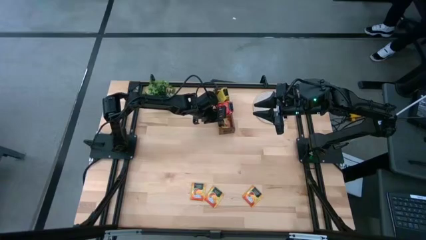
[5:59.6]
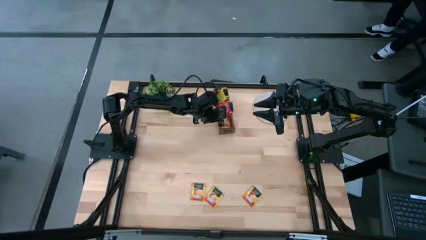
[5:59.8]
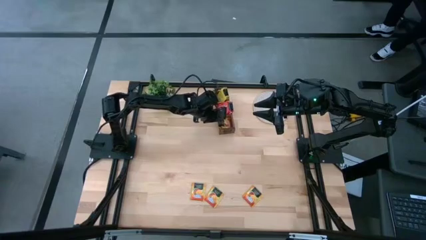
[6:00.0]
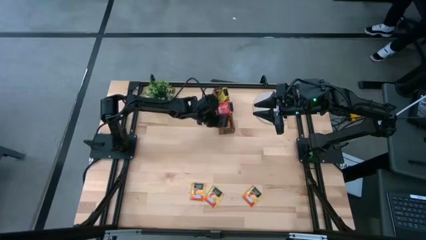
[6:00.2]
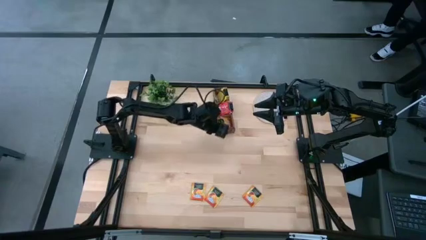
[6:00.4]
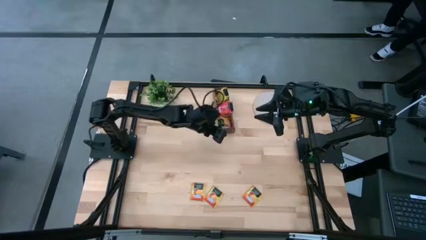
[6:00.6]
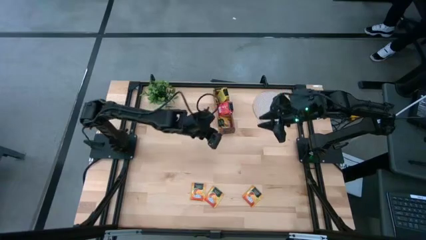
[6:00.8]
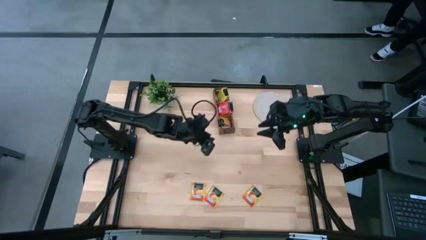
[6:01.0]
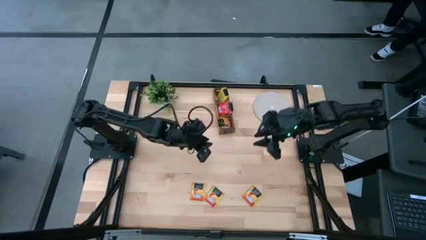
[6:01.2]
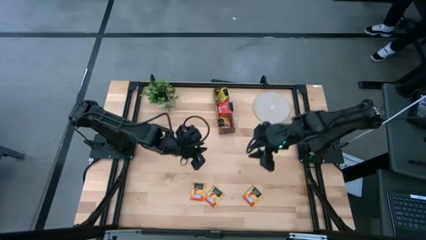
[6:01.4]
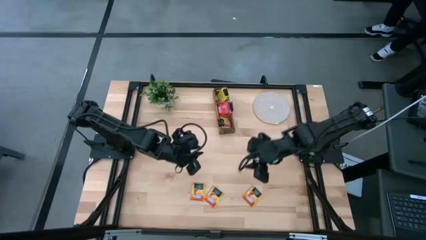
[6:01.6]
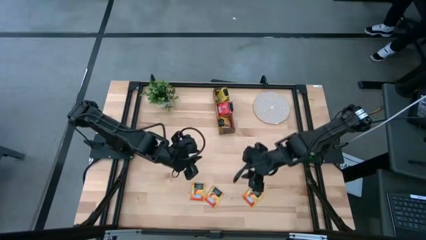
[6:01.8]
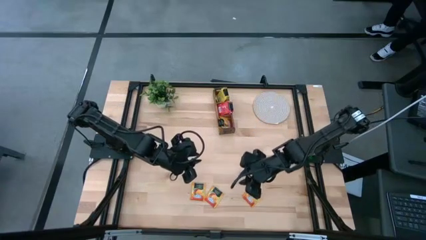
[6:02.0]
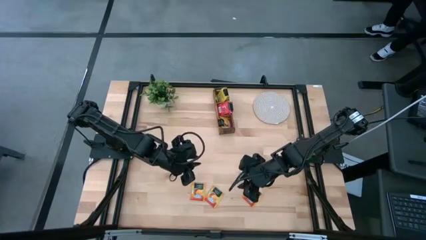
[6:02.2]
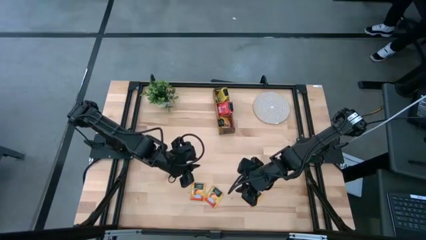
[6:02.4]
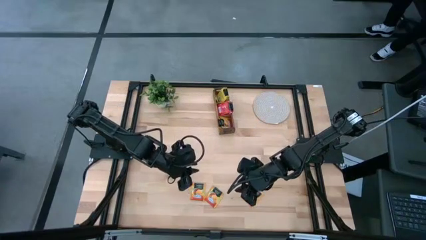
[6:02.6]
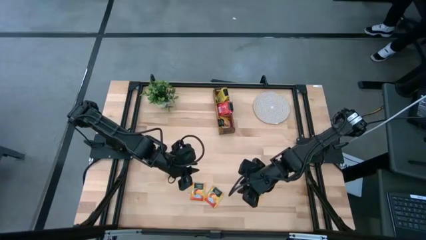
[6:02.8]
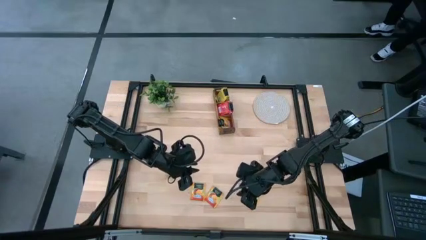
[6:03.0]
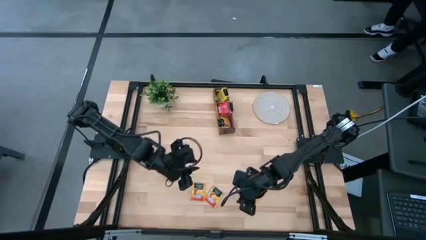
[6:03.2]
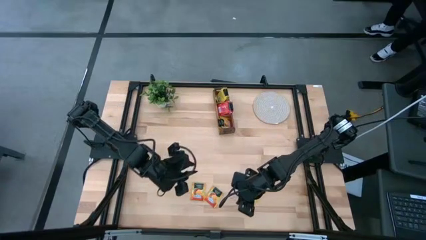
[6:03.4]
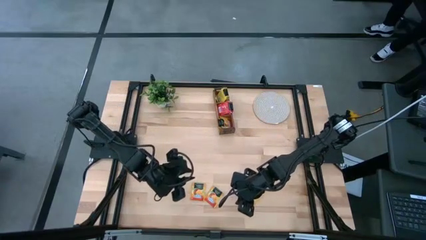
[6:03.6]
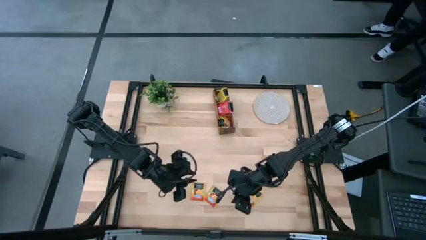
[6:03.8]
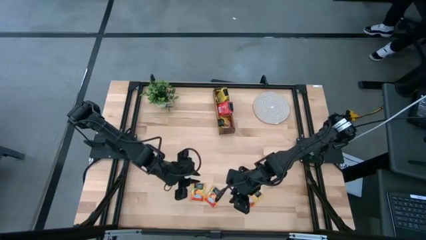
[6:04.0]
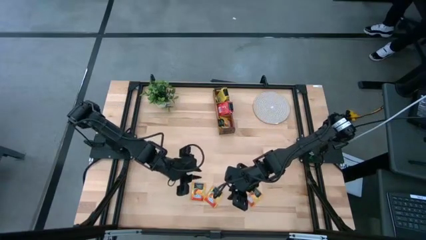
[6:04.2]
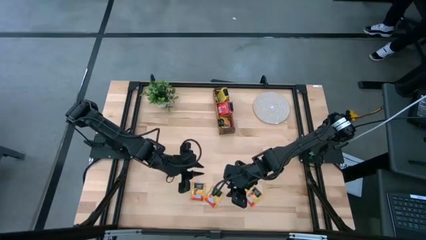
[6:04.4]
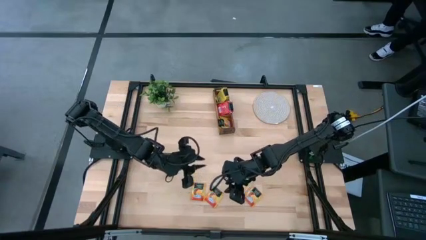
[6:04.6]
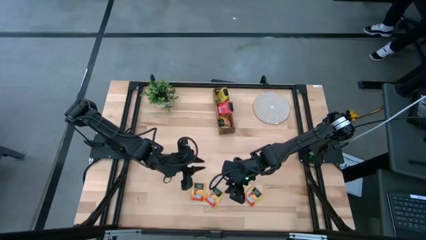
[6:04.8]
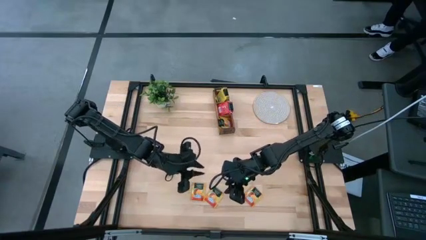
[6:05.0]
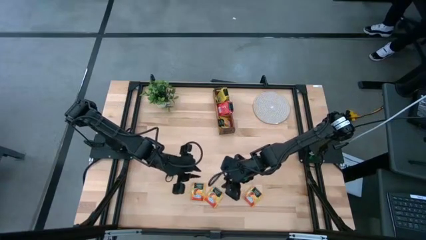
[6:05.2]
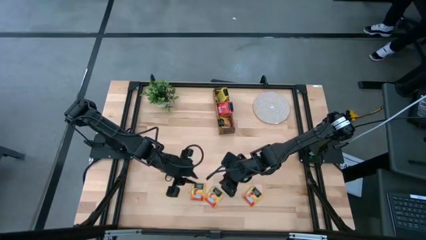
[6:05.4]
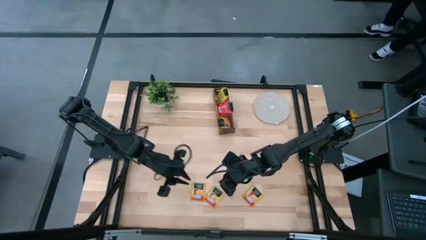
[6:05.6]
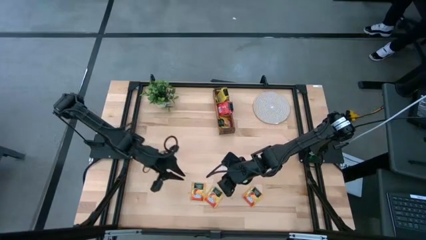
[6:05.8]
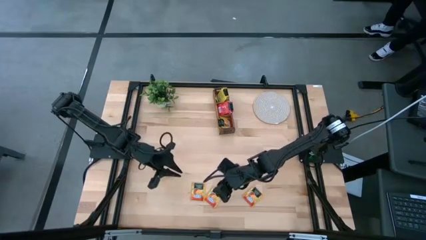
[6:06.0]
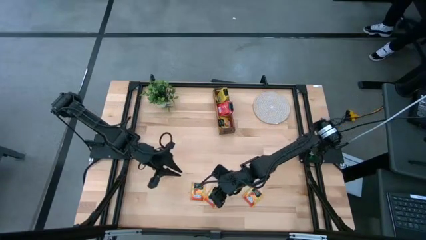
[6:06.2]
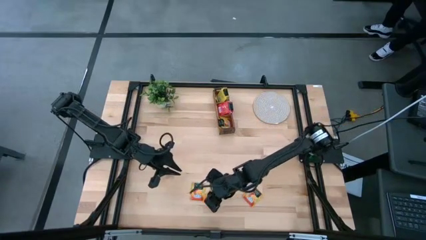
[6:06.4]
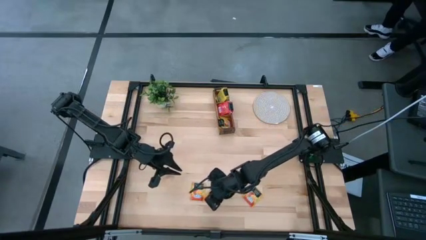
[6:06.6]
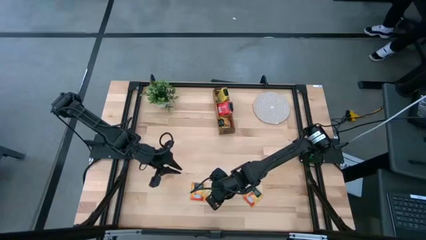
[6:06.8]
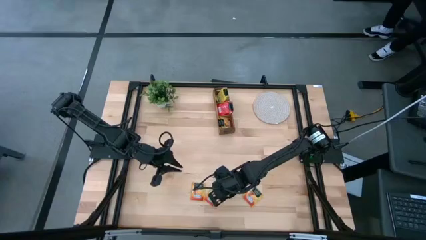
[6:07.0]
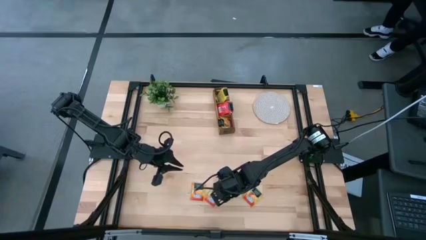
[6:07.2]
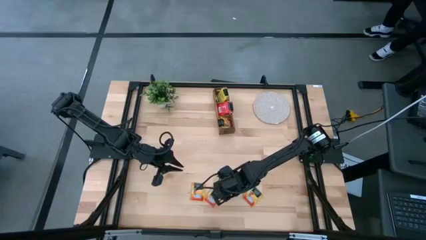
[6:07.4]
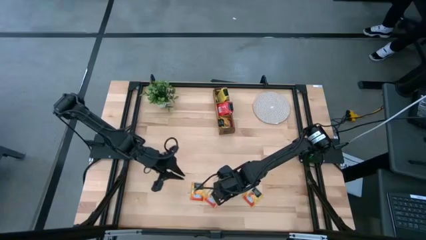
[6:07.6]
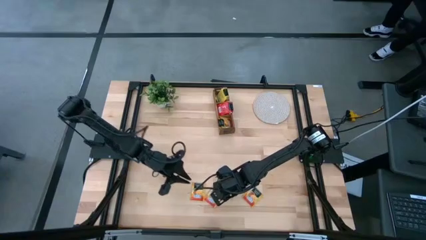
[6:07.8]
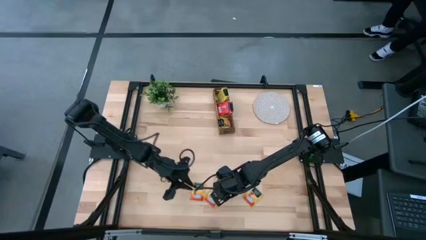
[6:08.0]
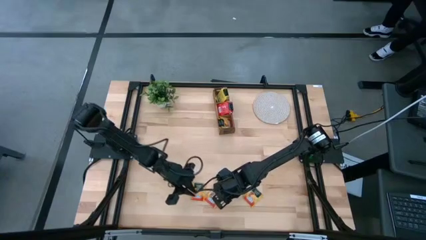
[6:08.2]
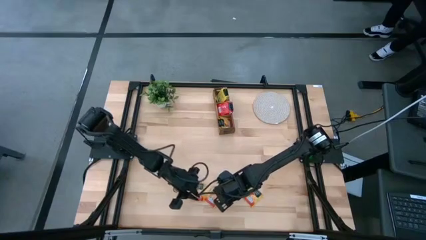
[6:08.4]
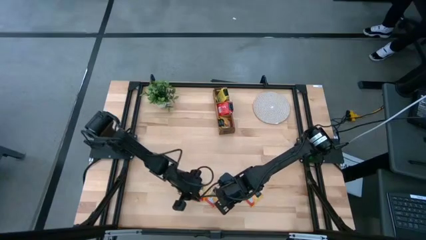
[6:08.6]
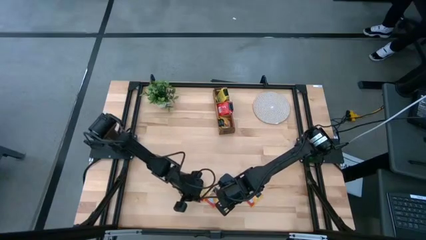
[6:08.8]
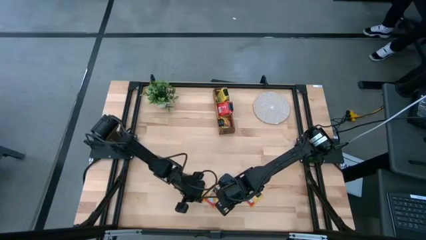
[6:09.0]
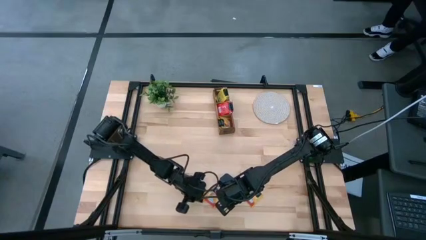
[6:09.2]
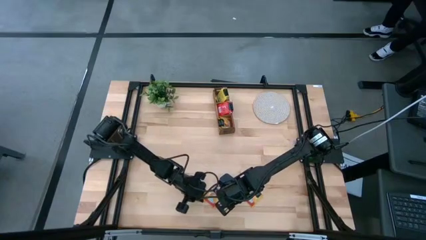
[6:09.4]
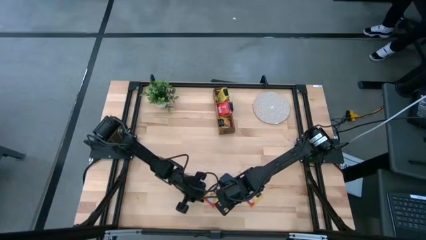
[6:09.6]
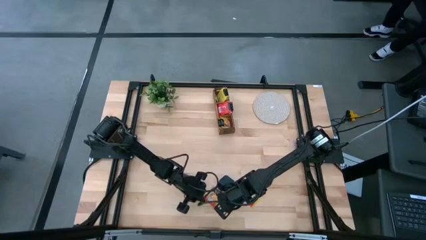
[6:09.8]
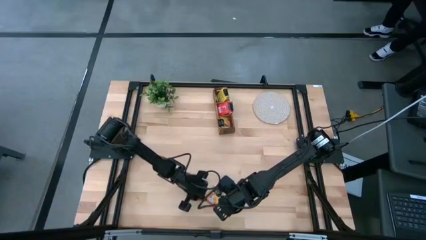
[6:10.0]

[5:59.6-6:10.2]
Task: Pick & Place Tea
Put the orange tea bag into the left section of the wooden organizer

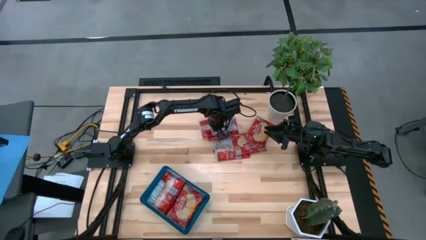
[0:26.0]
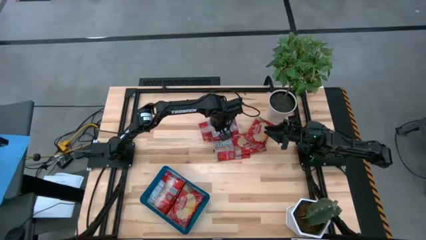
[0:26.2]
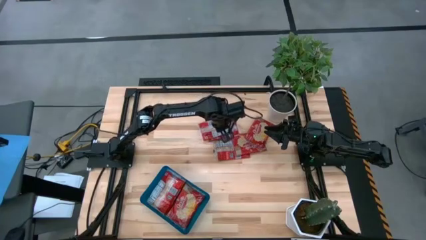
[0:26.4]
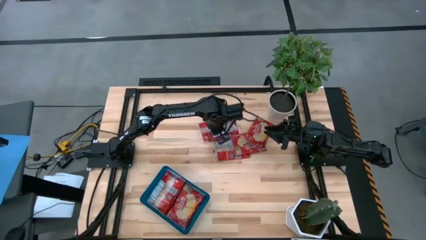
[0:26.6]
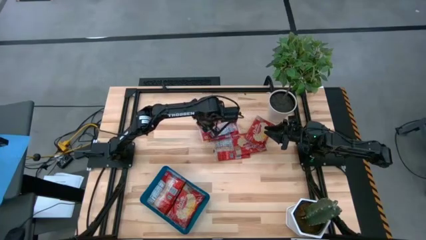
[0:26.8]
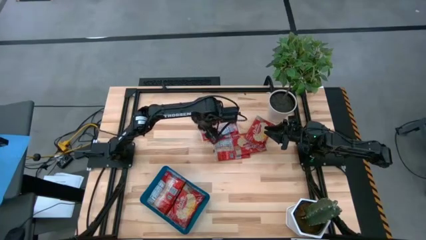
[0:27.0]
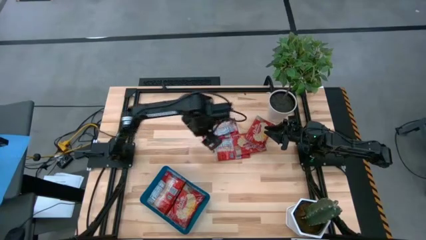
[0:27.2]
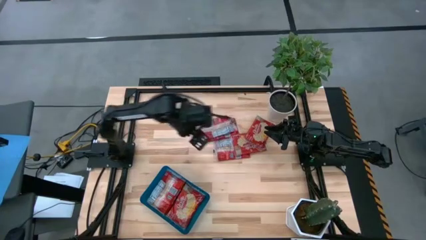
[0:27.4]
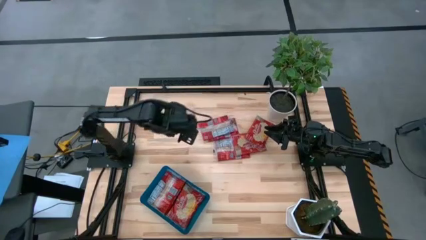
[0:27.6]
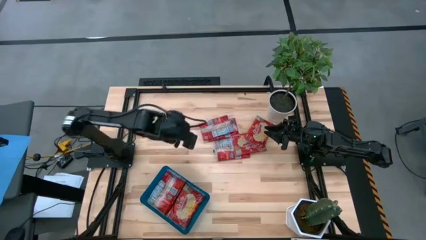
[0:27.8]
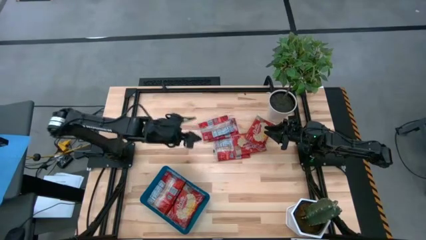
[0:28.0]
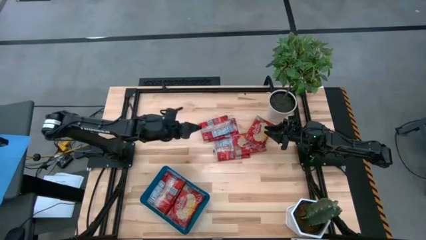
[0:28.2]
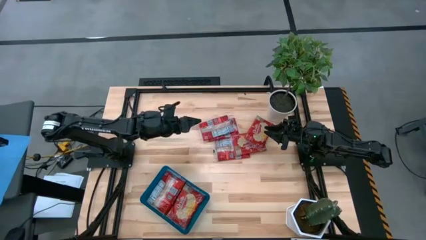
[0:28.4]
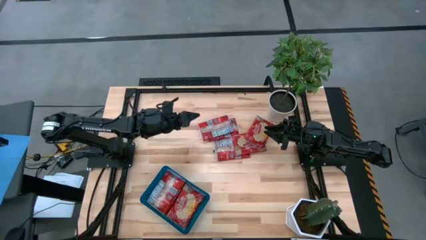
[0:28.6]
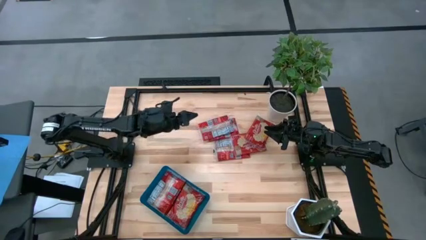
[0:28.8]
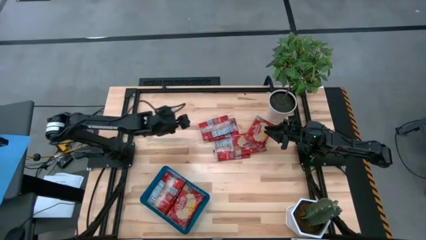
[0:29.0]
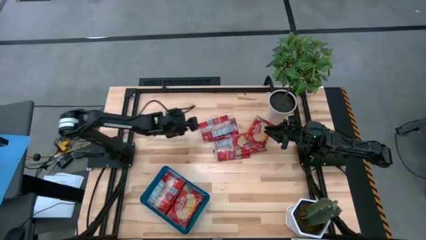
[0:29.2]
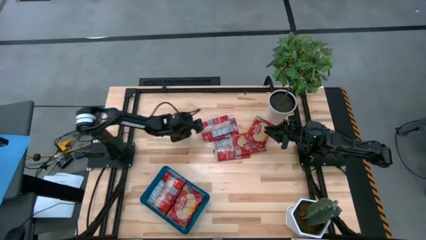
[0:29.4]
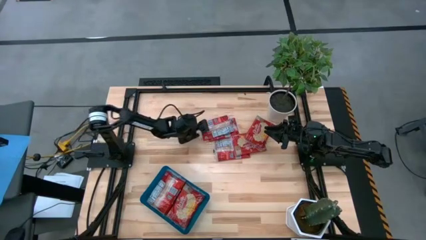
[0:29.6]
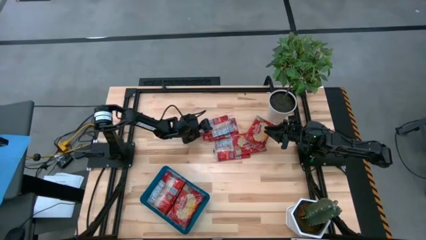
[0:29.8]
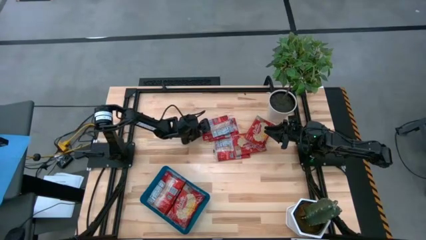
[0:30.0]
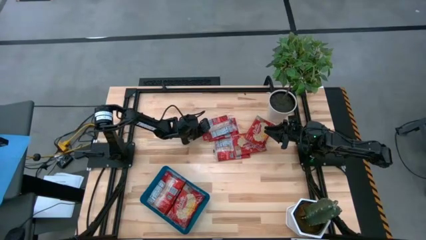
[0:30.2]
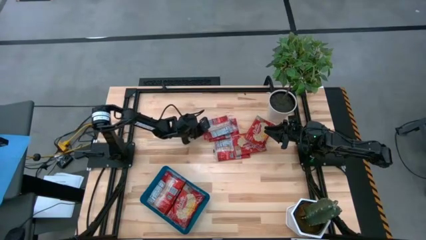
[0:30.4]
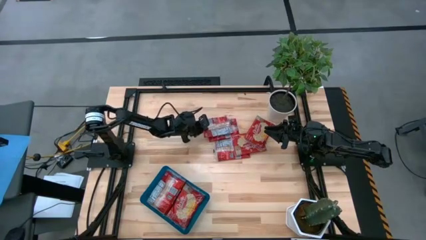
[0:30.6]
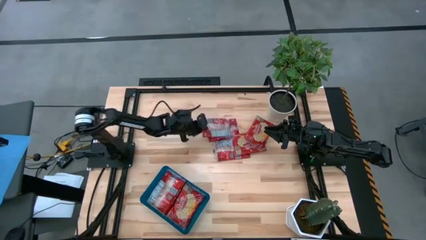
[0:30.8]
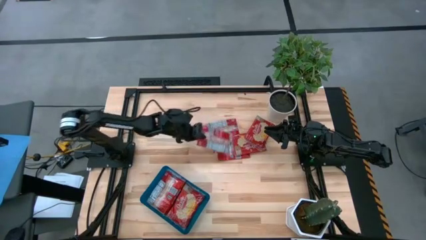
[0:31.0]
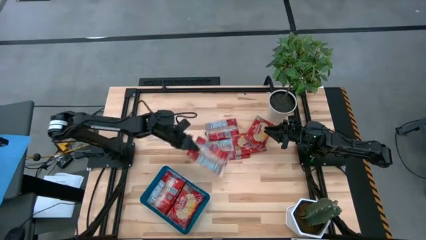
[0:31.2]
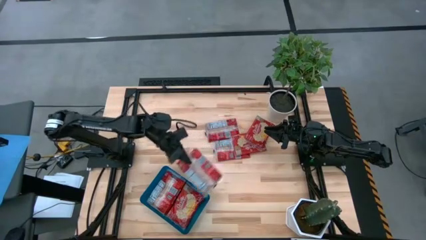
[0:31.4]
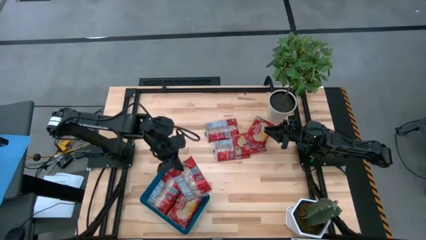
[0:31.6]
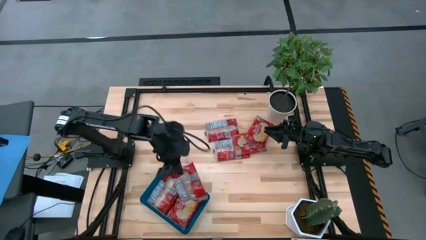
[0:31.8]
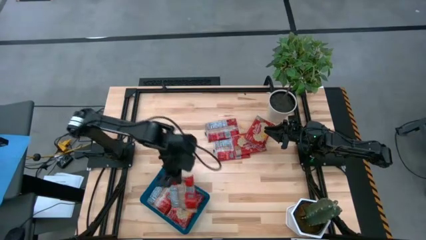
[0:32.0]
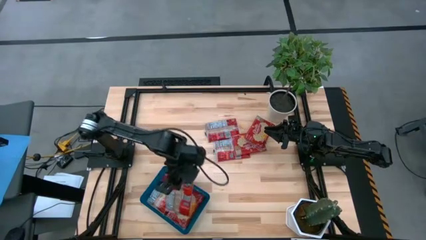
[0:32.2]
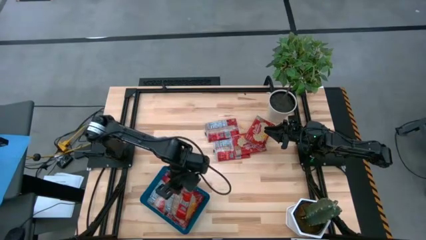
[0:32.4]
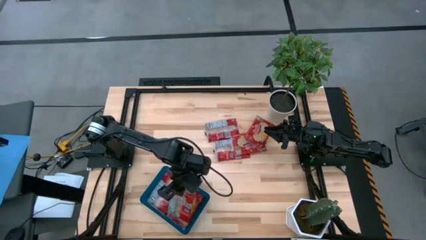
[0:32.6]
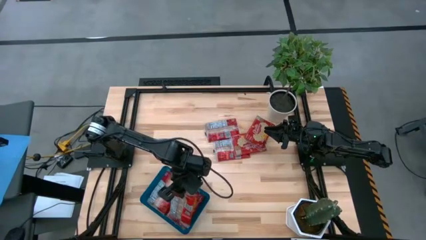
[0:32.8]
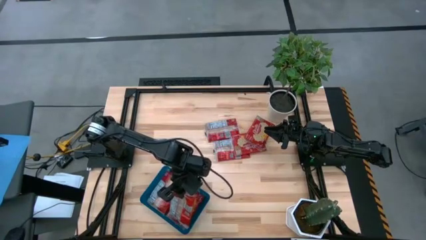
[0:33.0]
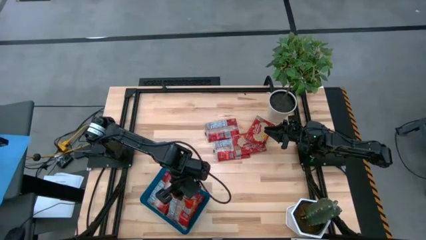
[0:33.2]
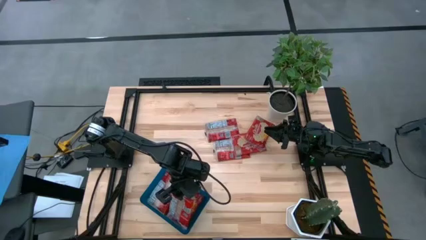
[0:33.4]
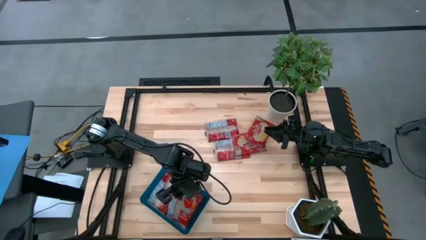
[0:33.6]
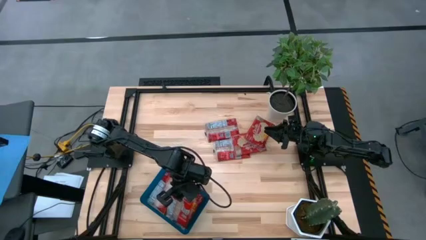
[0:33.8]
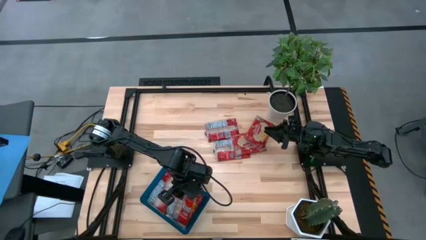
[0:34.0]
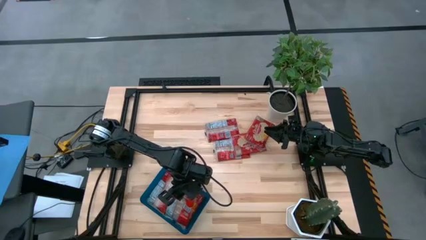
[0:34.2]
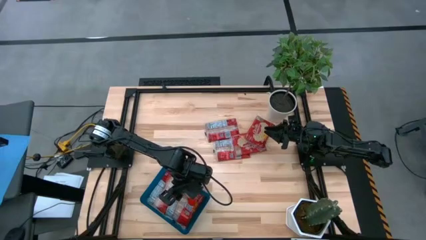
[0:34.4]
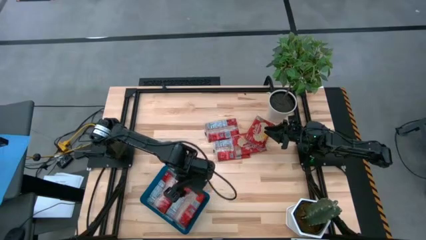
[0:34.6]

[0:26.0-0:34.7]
Task: Sort popcorn bags into baskets
Put the red popcorn bag into the blue bin
